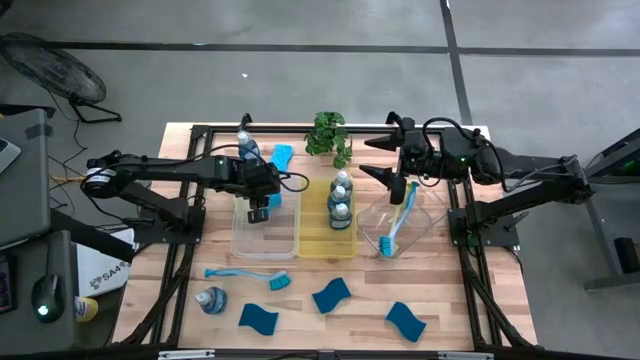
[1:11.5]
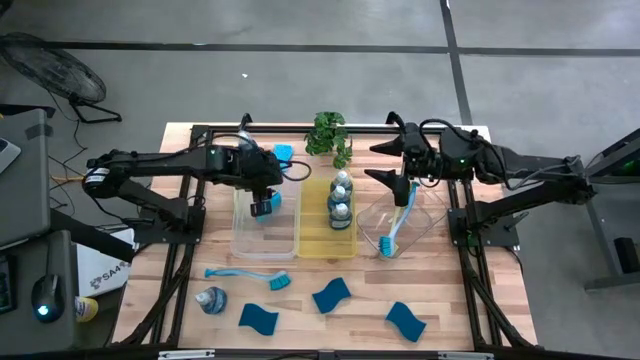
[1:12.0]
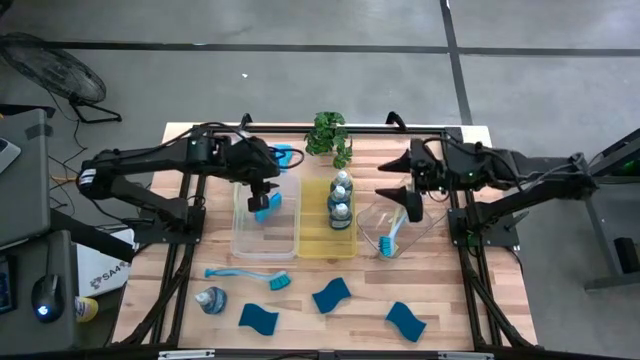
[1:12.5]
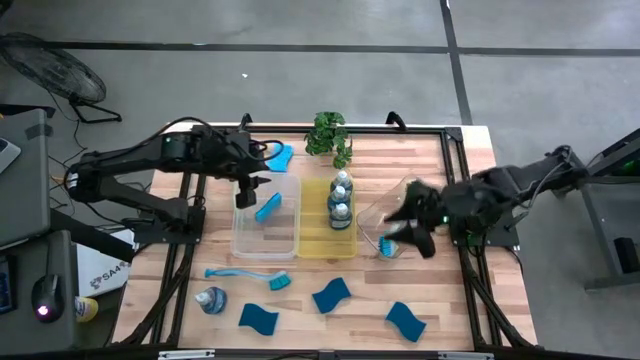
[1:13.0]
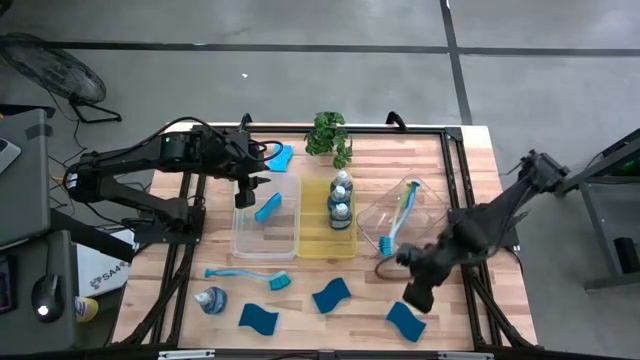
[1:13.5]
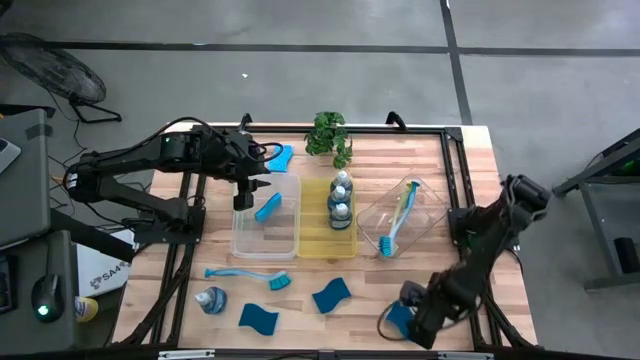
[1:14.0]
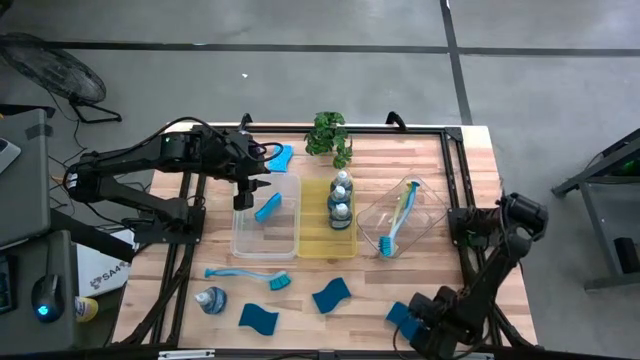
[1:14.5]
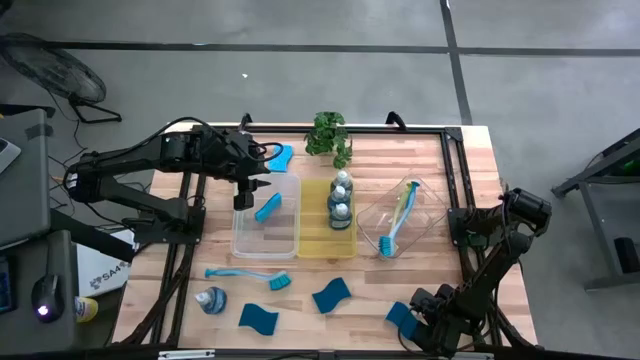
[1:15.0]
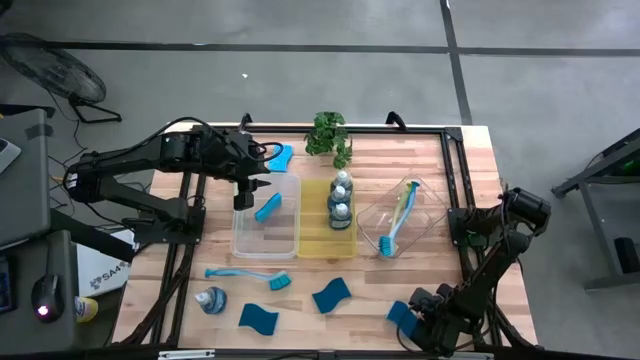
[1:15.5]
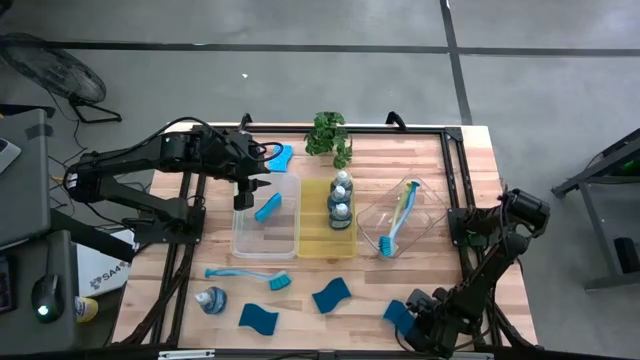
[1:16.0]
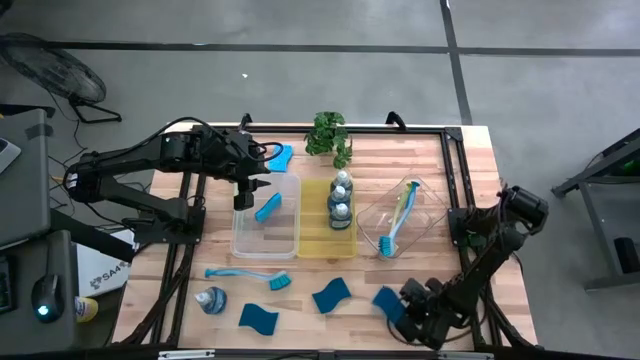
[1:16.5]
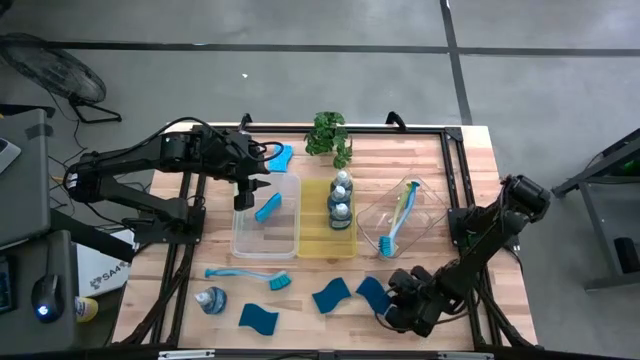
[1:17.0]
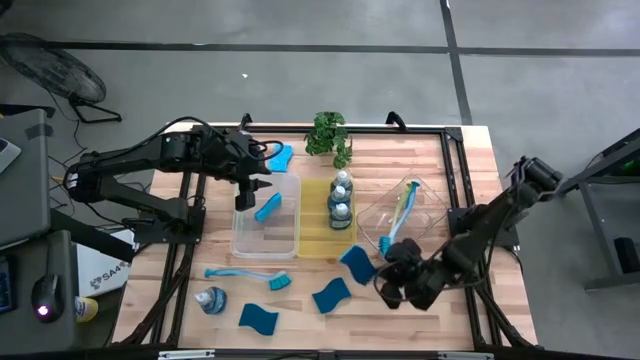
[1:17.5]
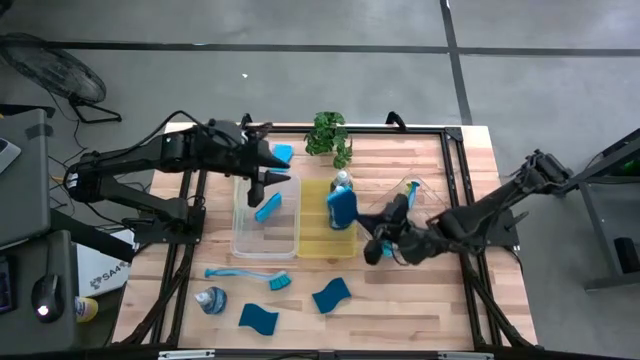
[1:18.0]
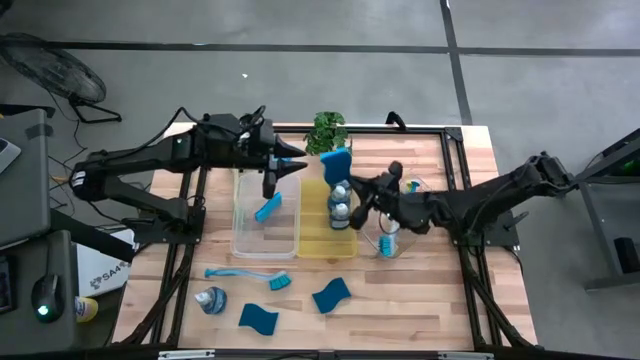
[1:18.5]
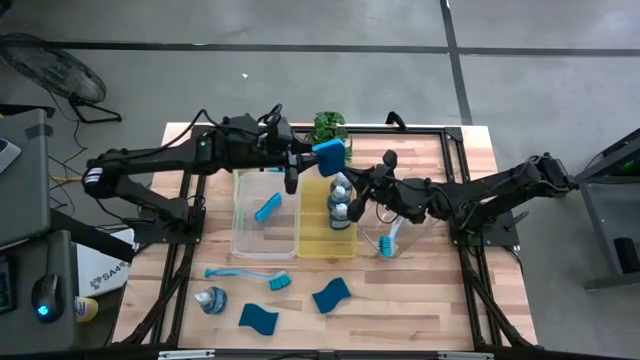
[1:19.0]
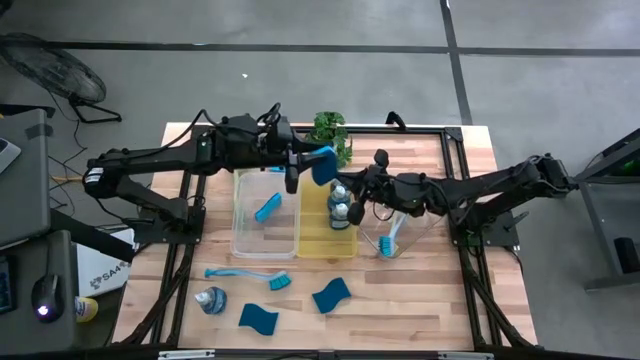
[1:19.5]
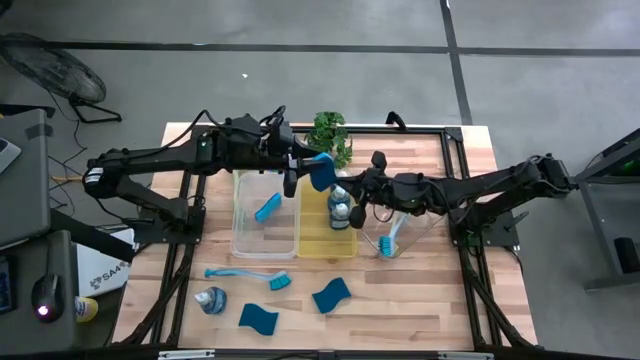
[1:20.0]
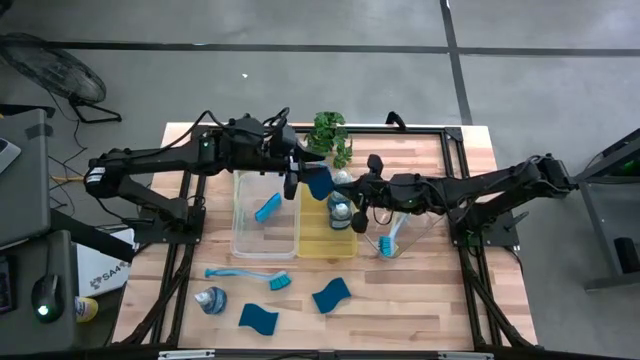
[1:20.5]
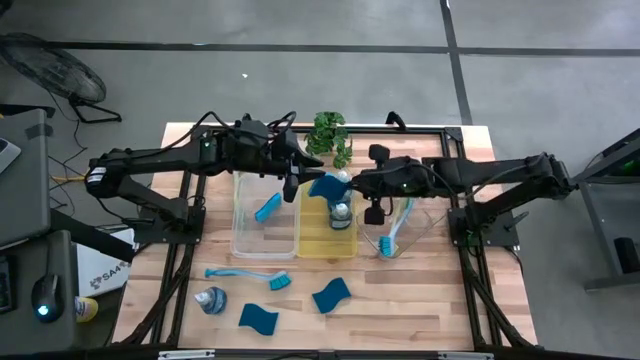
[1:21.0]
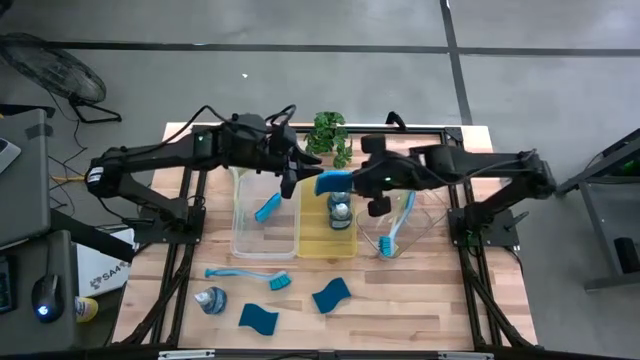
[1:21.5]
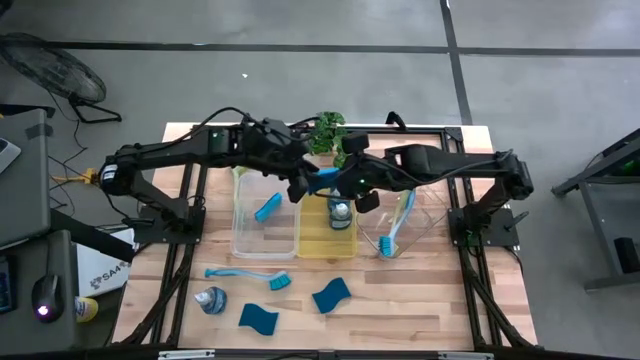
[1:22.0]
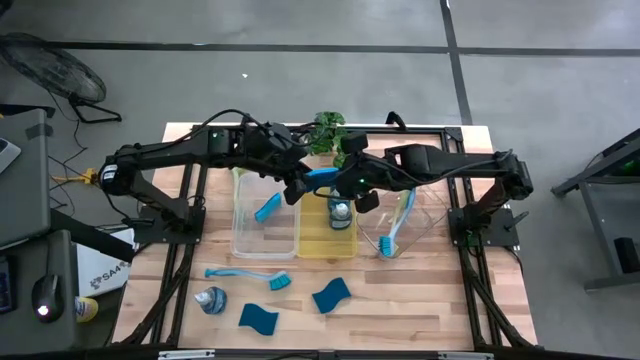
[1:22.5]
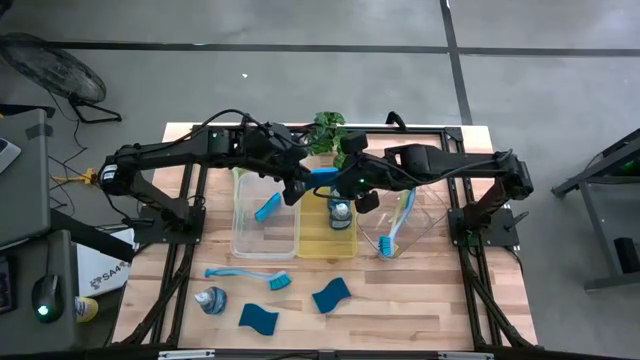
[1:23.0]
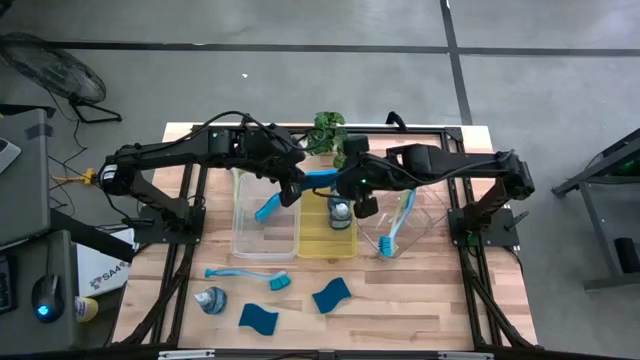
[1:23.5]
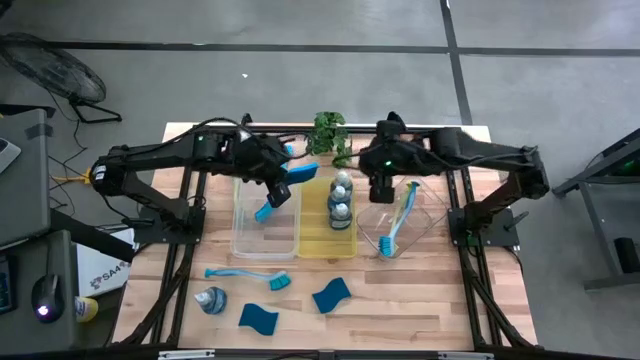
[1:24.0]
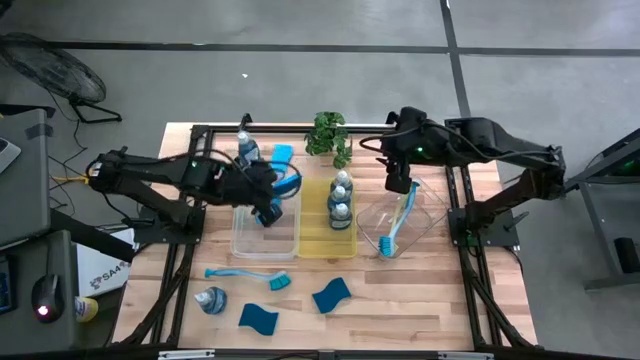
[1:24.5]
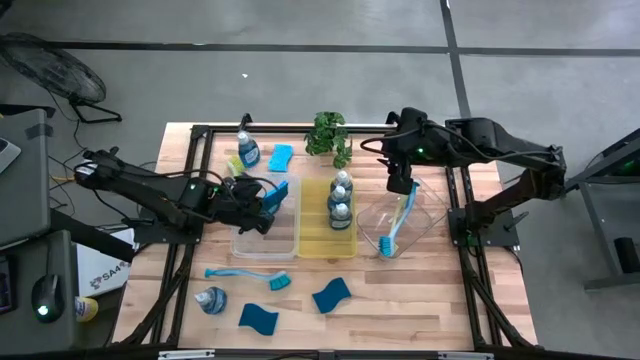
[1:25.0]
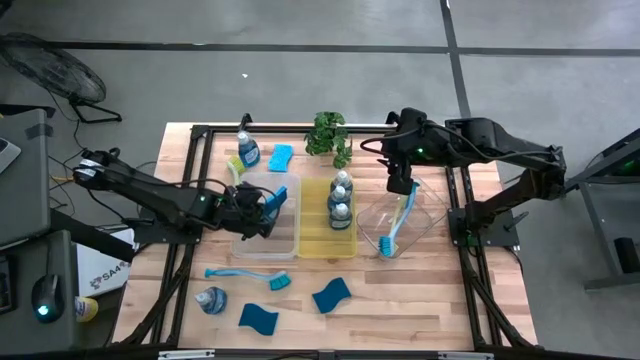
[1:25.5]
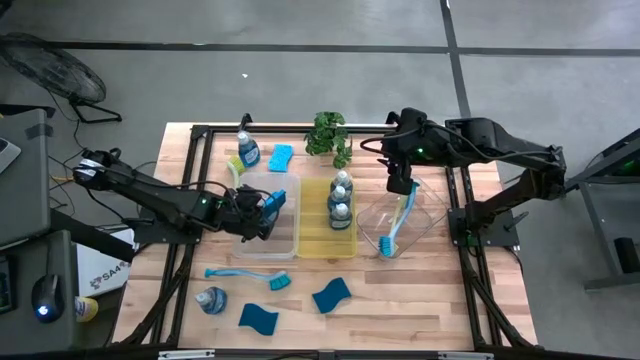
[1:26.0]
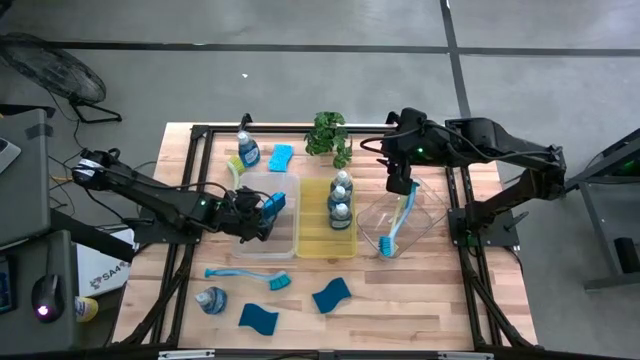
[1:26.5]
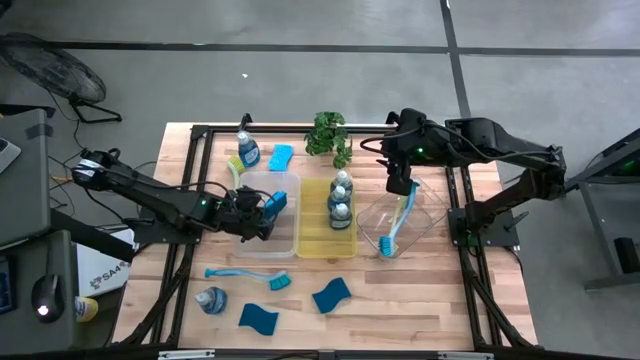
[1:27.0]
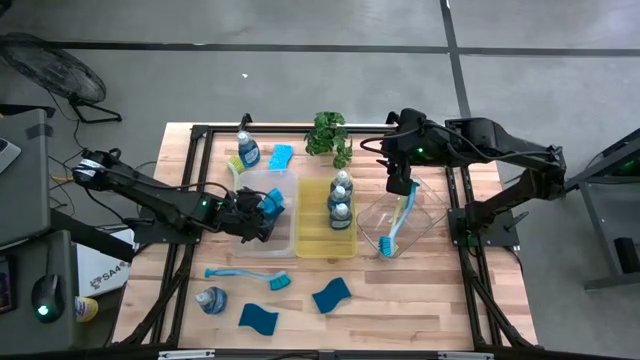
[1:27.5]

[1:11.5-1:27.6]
Task: Pick & Place Kitchen Sink Supplies
Put the blue sponge into the white bin

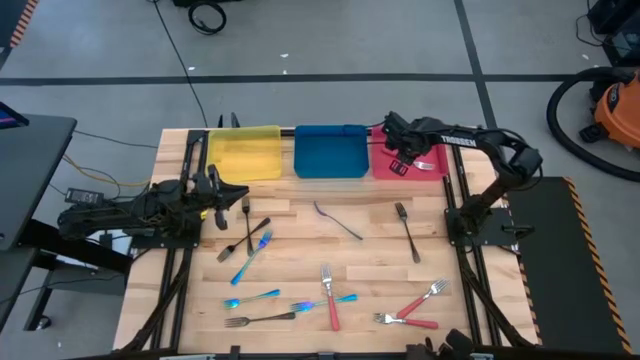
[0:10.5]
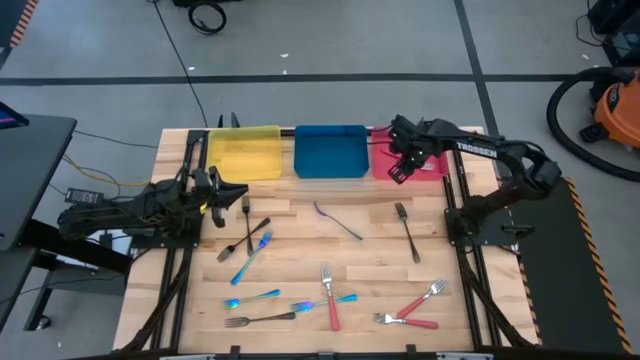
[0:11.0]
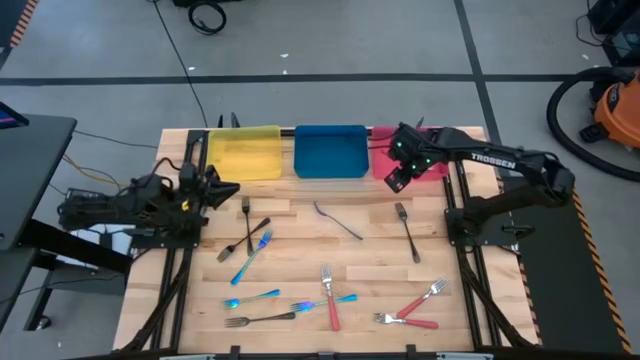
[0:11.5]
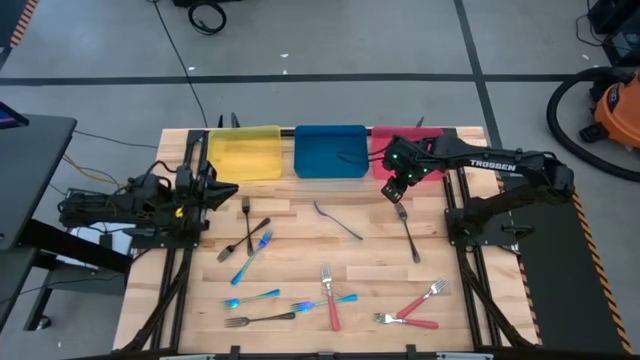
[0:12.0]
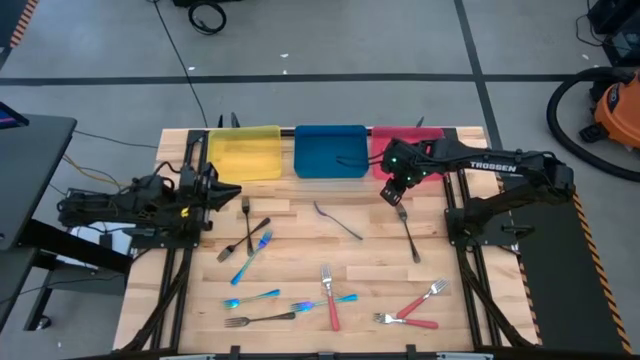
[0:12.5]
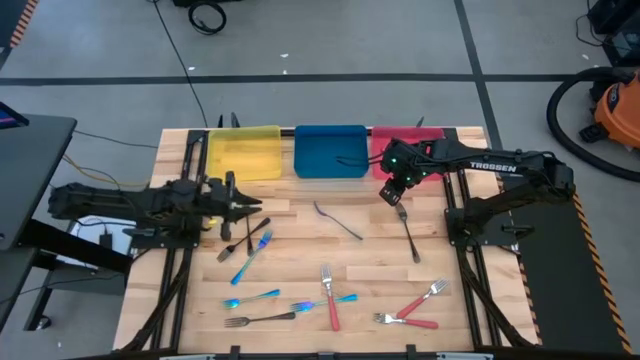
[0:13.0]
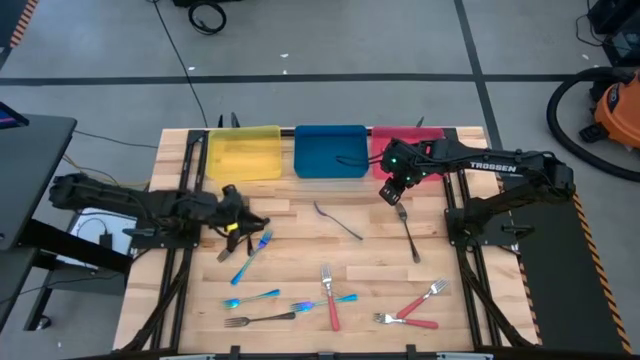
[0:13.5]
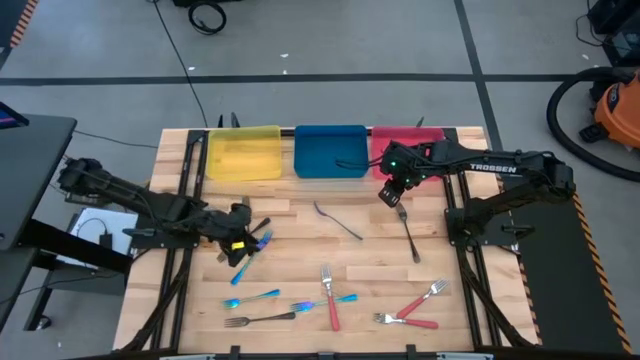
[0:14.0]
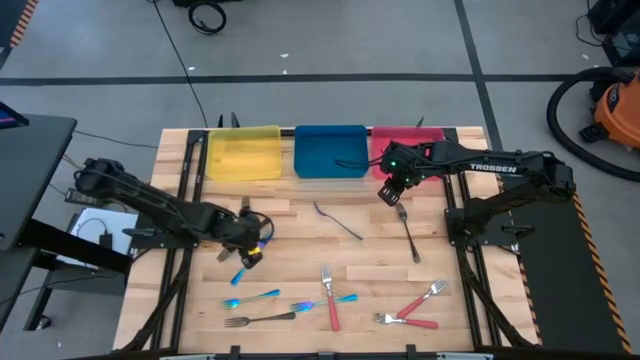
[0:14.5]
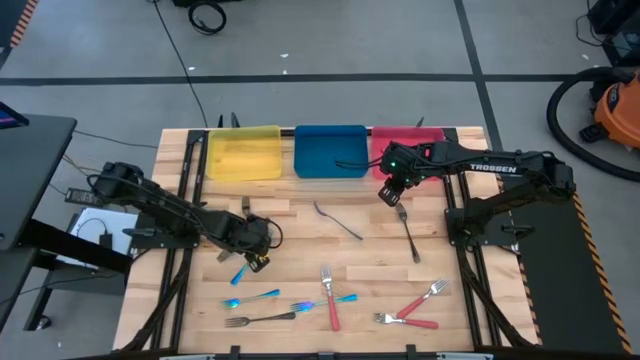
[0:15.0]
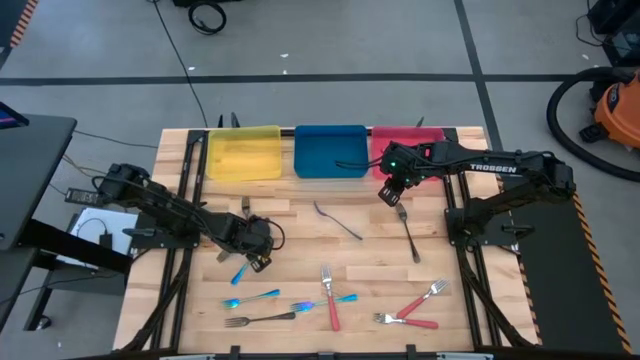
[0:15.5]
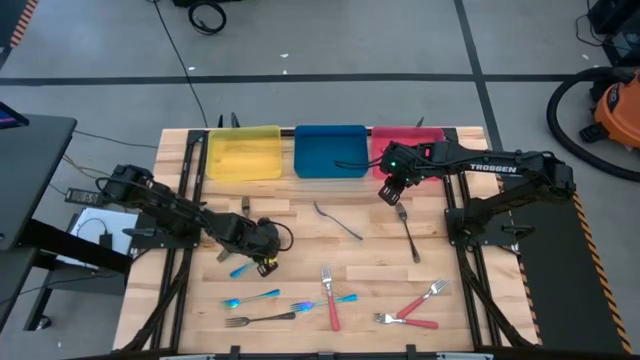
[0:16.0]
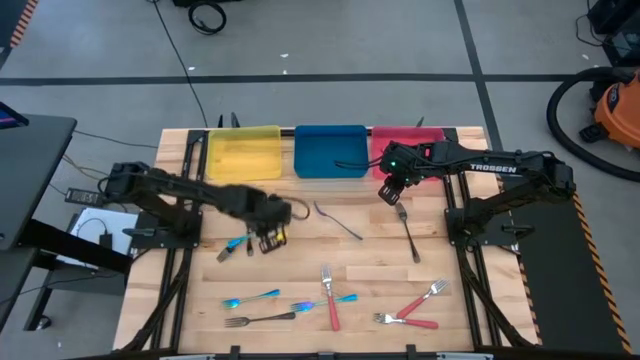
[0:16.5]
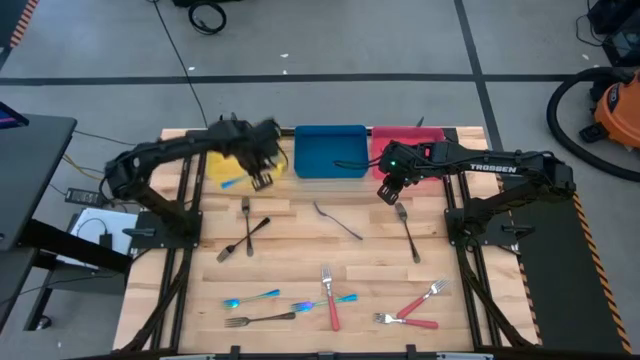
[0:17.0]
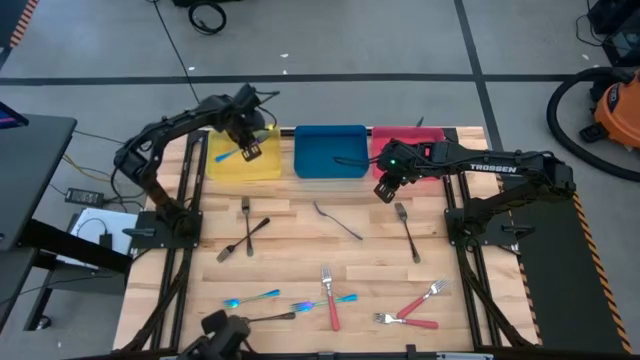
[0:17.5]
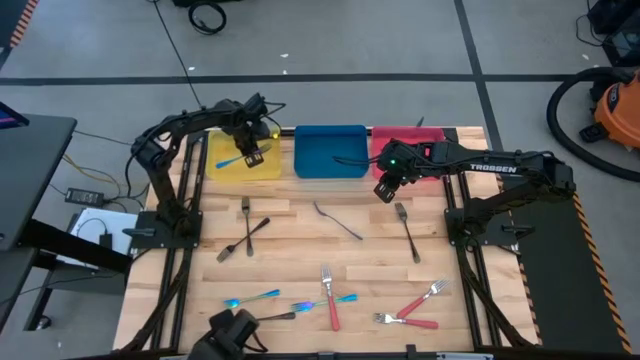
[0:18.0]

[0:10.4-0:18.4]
Task: Sort silverware by color (type)
Put the blue fork into the yellow bin
